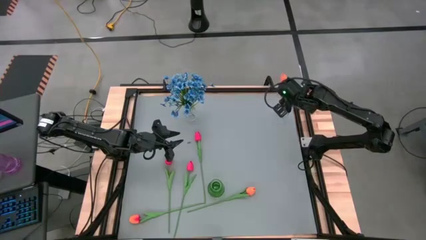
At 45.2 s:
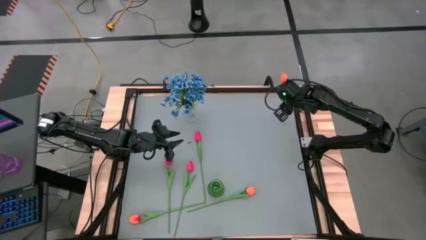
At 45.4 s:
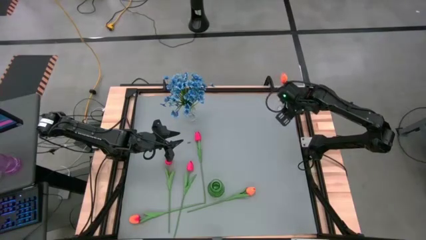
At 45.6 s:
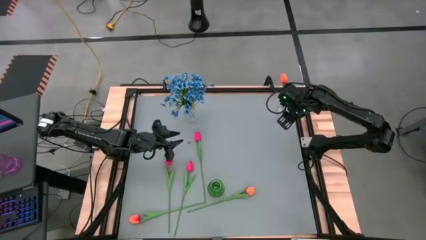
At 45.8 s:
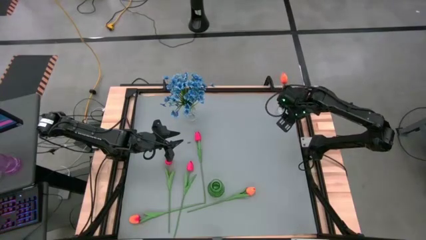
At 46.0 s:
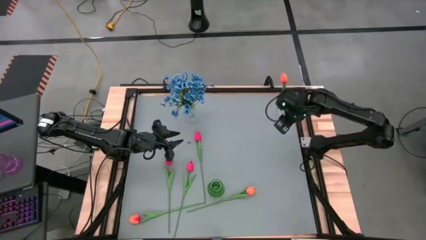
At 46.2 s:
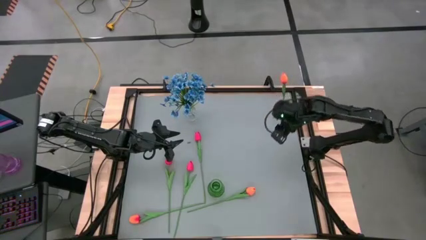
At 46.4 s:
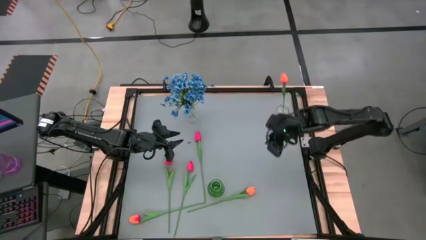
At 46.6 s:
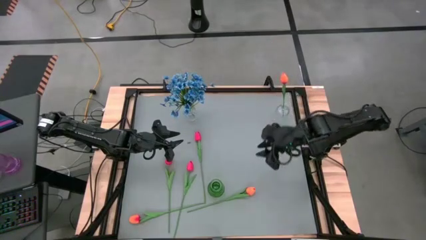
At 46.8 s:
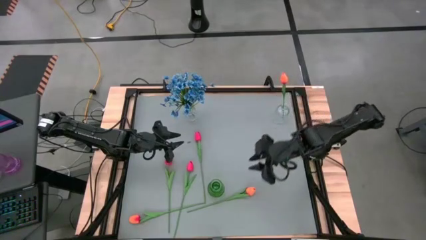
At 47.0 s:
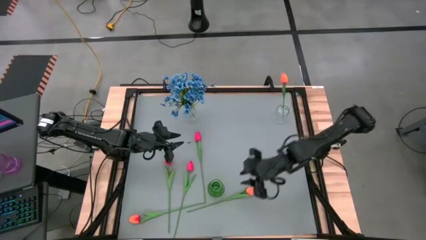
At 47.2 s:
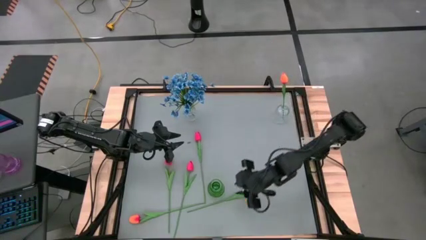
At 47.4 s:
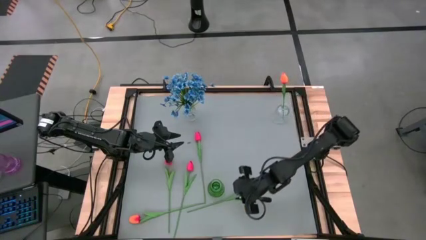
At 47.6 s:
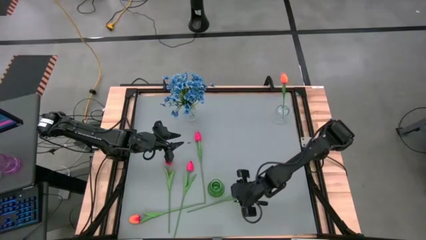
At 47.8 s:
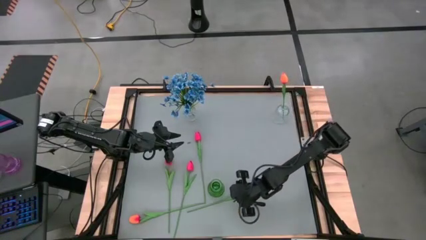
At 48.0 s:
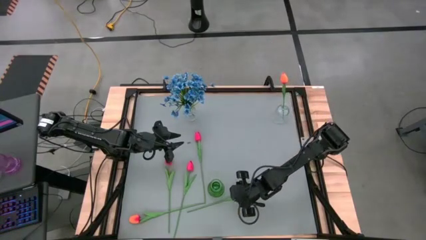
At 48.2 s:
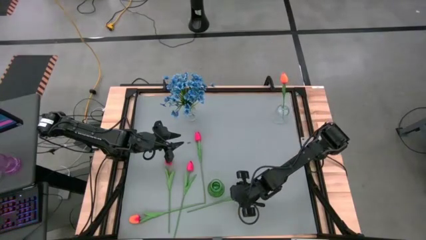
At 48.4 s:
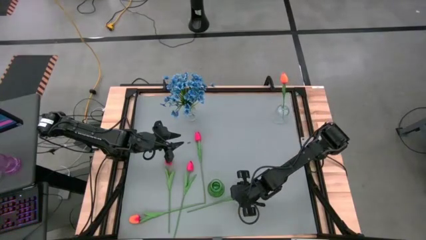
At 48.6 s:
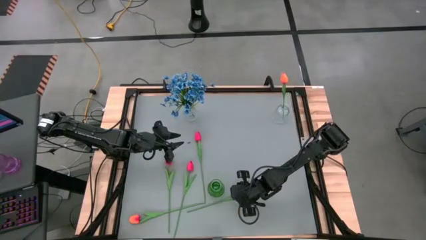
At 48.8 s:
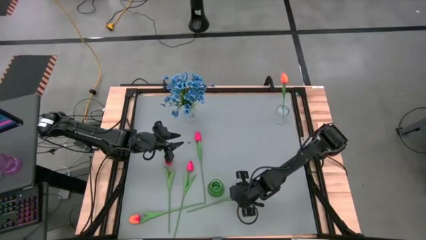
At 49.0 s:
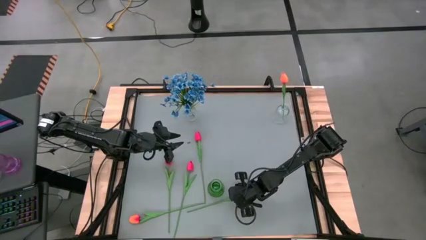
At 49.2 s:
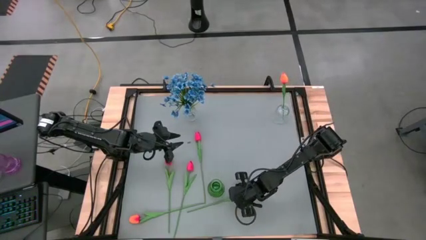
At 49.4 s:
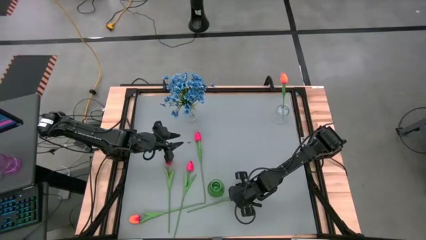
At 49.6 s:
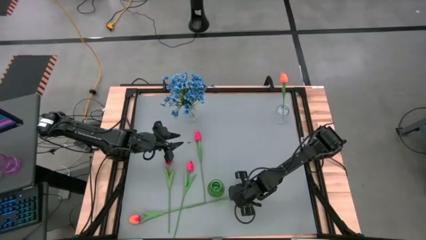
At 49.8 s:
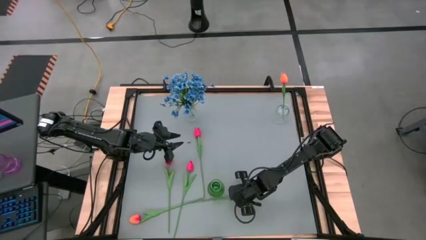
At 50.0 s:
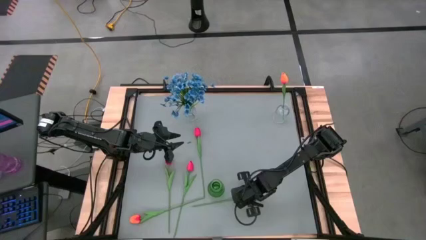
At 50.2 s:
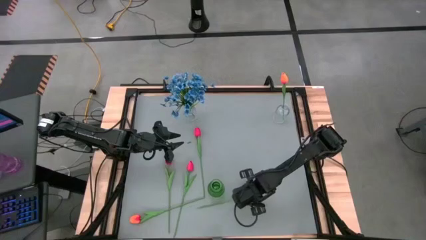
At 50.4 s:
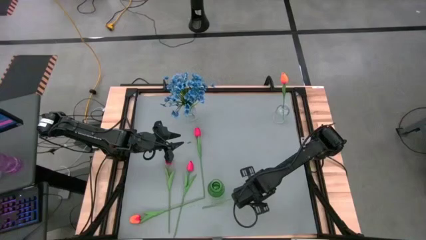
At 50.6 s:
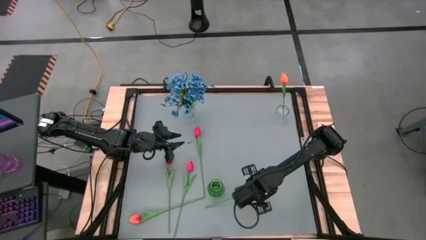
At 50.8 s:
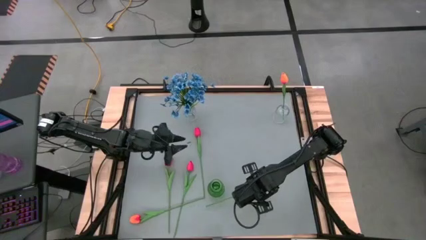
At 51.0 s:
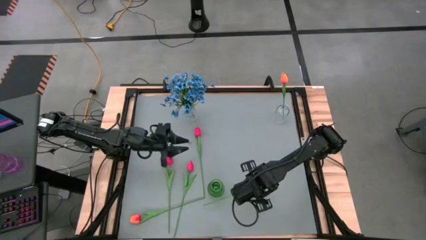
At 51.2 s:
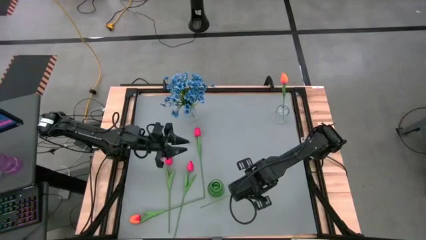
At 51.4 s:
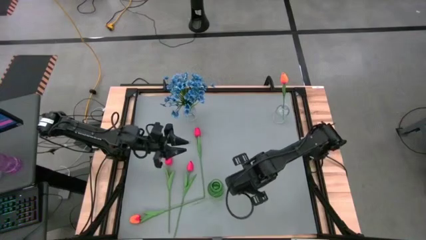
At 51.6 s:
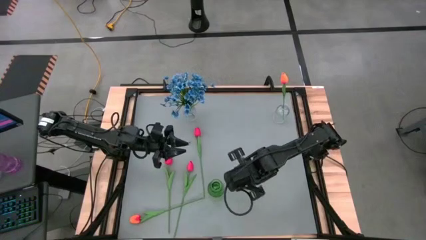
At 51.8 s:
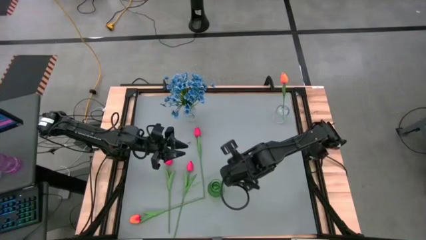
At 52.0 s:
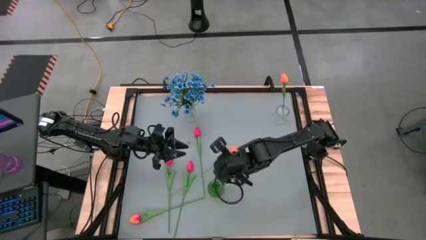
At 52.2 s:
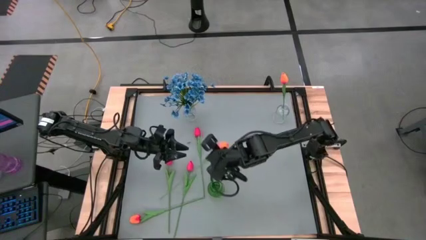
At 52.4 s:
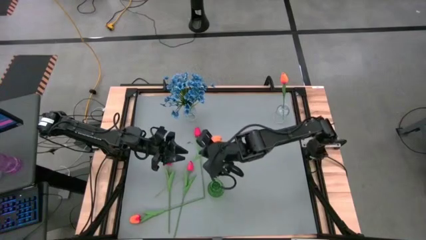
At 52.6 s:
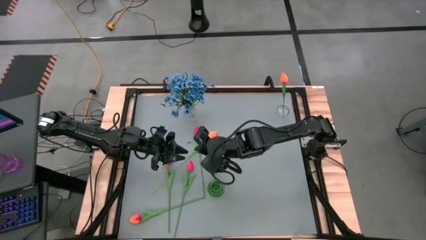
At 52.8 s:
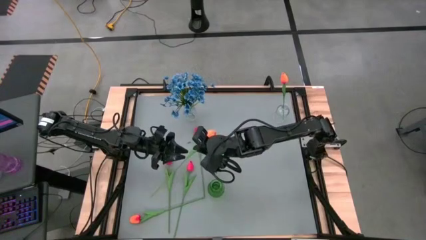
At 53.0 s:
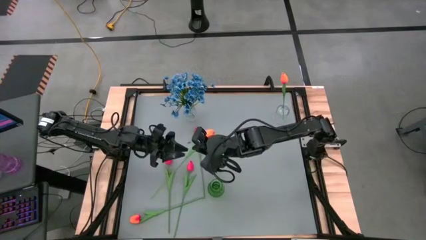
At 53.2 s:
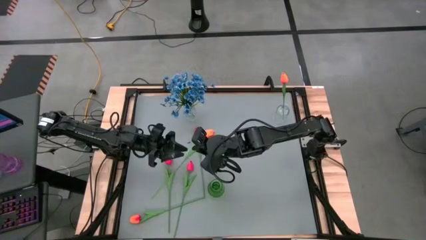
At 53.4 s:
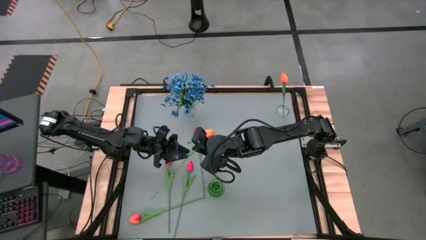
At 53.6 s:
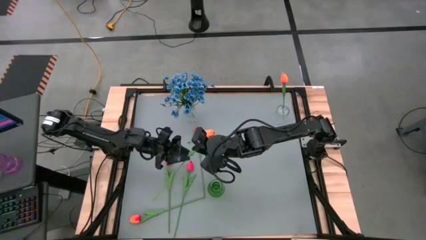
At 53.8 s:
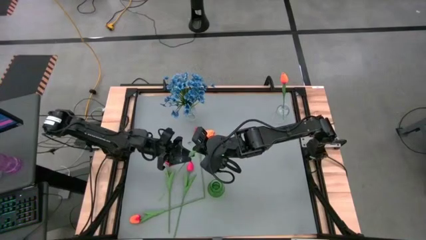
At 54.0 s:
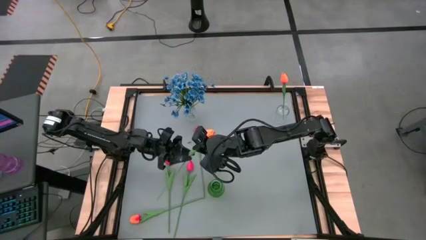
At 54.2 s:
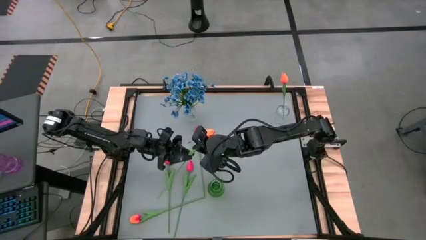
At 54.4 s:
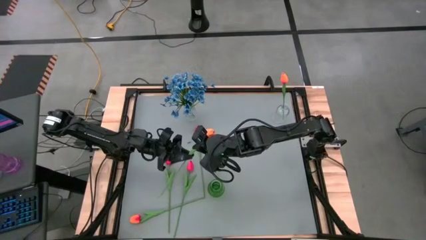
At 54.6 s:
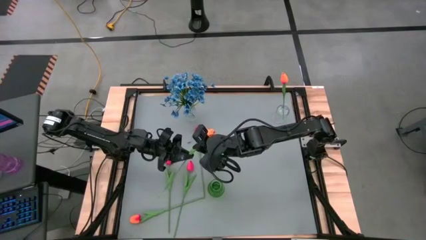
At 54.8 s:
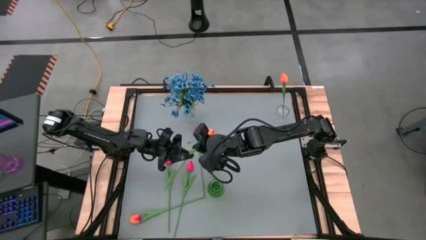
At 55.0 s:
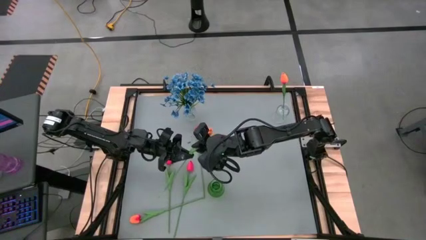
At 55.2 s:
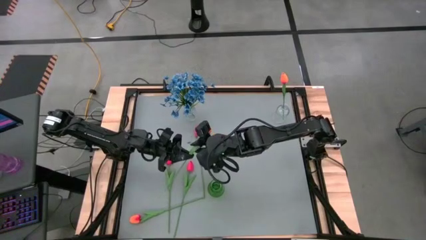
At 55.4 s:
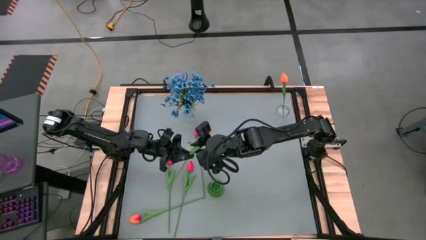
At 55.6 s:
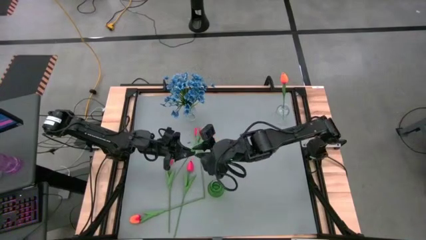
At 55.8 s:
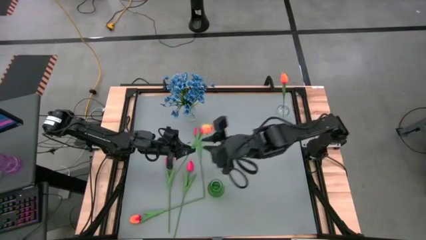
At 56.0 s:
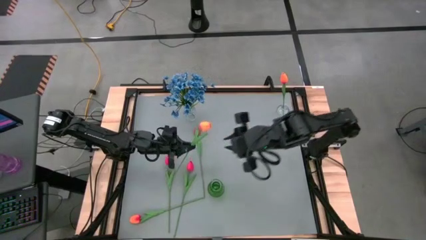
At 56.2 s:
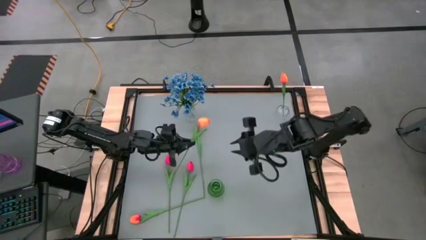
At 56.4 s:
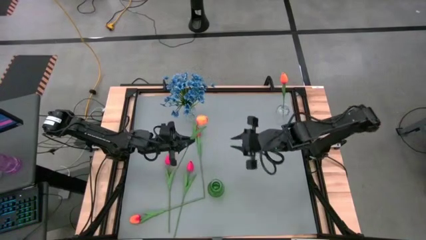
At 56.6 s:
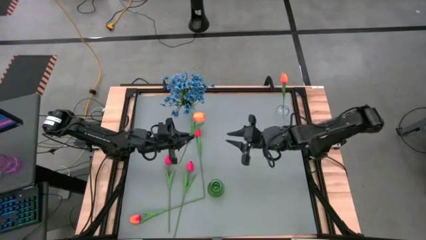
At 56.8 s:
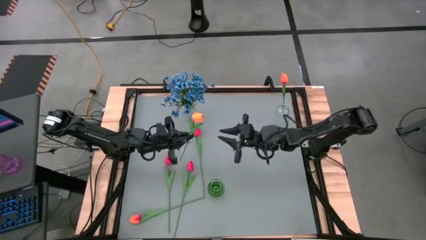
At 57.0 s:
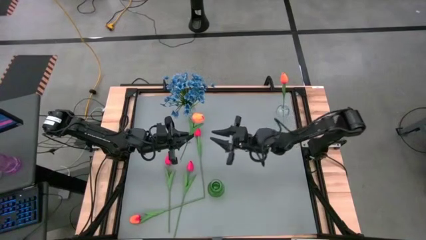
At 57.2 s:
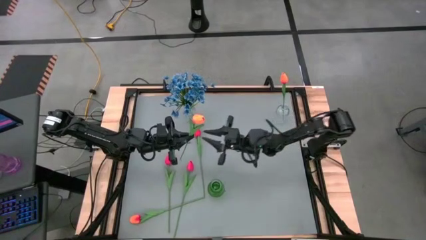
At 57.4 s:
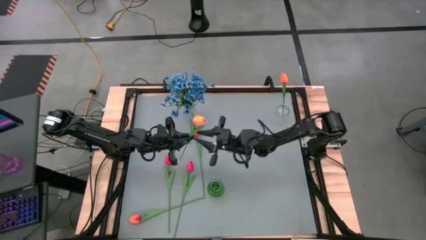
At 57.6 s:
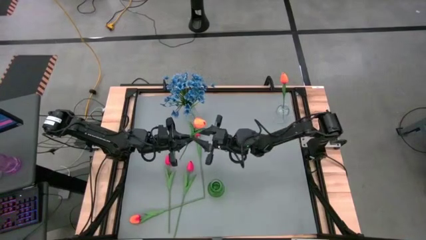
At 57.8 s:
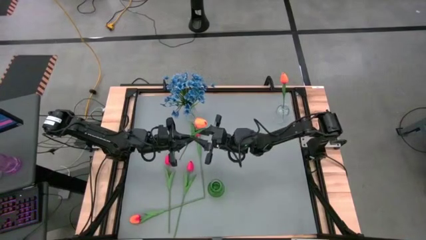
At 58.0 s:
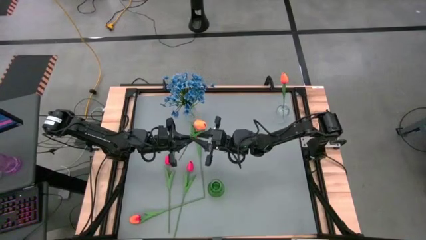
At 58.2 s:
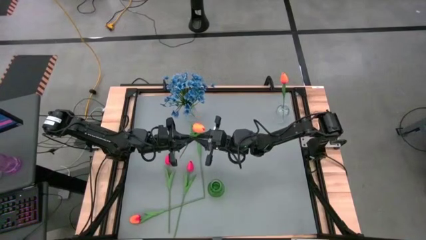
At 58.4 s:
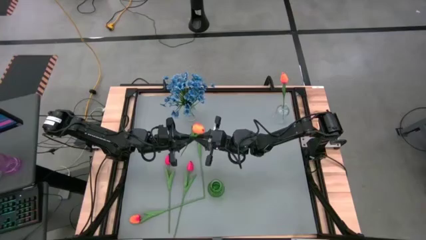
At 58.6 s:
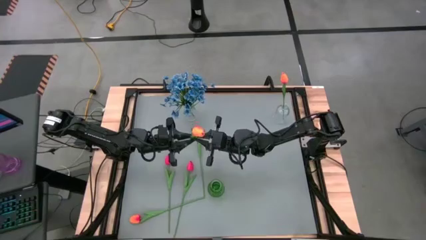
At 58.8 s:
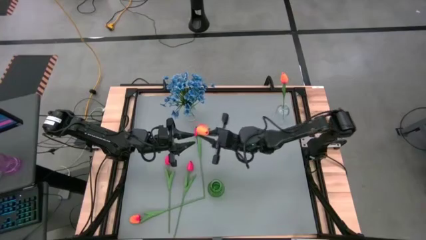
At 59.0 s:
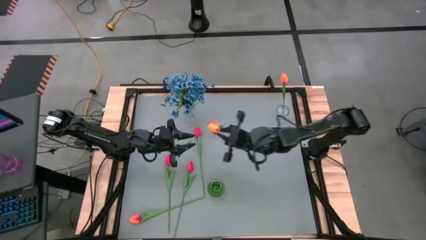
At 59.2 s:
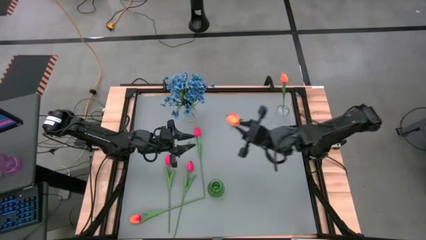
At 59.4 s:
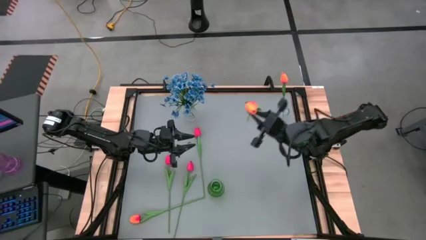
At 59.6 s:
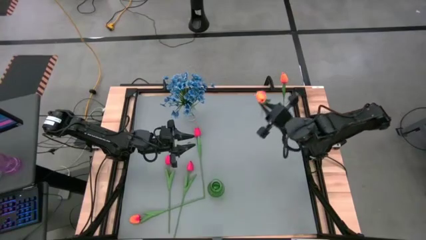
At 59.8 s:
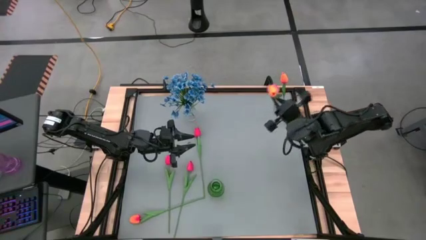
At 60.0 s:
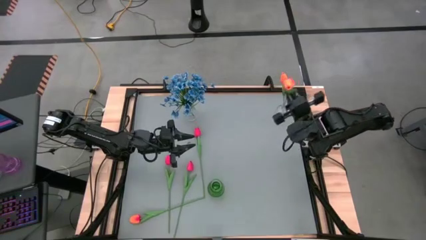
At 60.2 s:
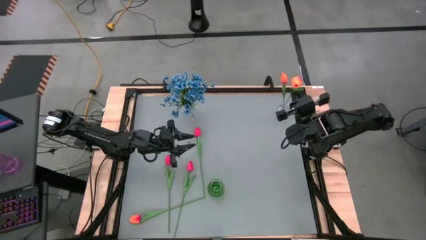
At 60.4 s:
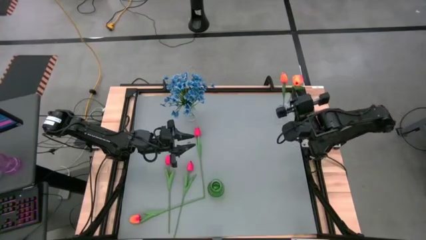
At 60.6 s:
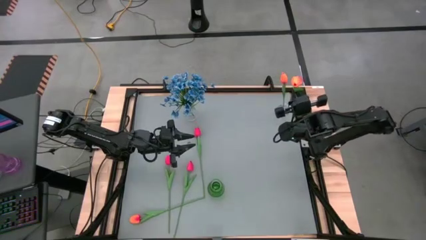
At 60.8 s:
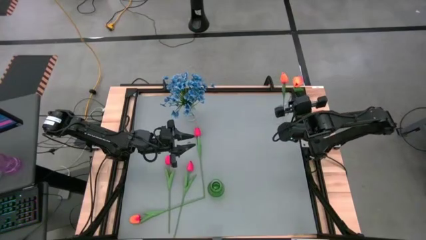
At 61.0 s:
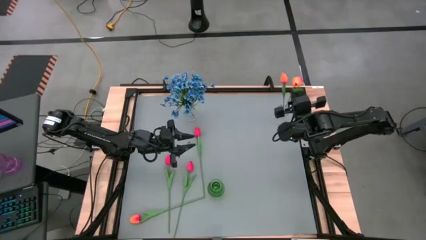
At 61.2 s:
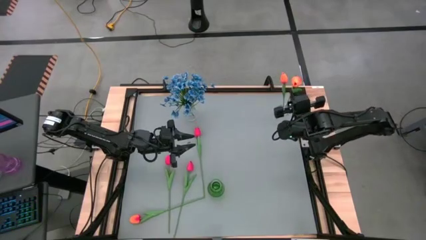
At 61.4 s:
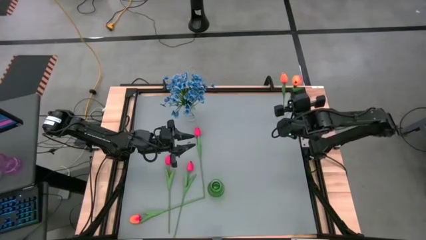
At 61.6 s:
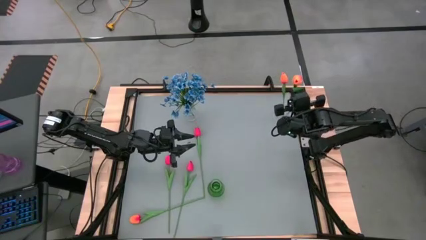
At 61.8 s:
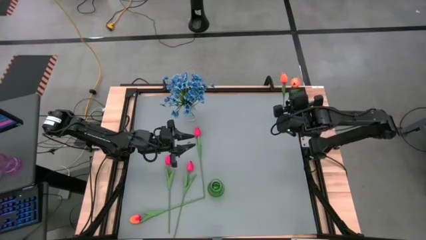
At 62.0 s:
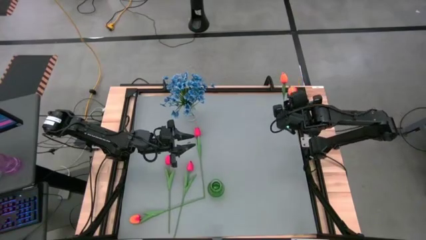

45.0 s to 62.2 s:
Task: Sort flowers into vase by color
Put the right orange tulip into the top right transparent vase
